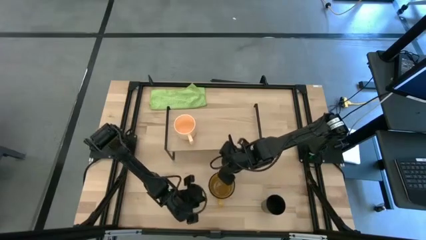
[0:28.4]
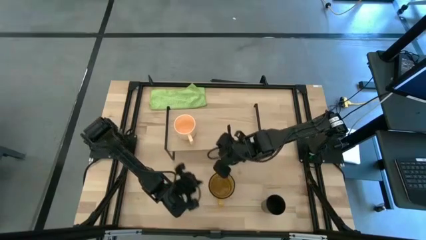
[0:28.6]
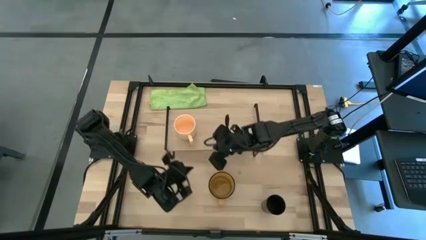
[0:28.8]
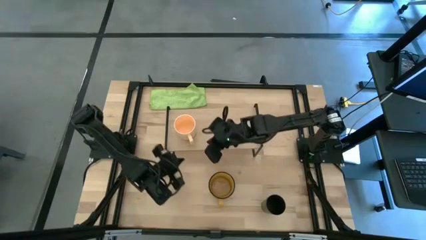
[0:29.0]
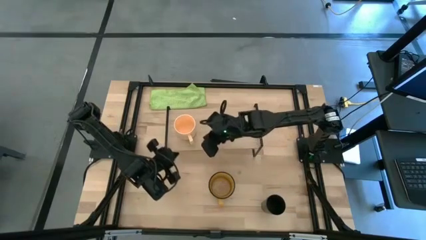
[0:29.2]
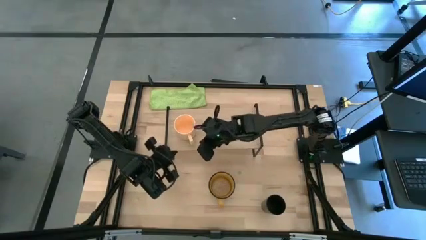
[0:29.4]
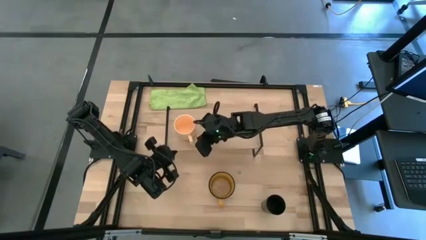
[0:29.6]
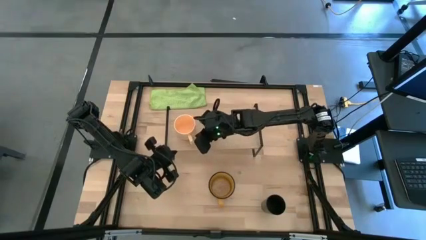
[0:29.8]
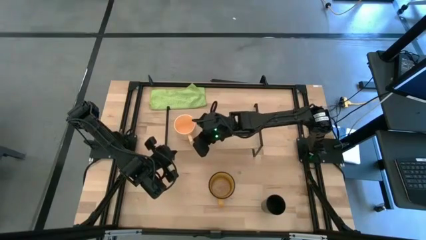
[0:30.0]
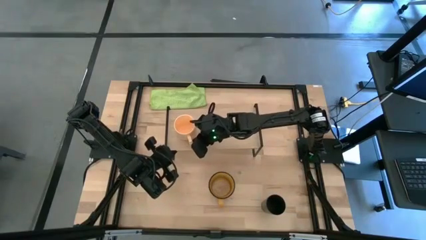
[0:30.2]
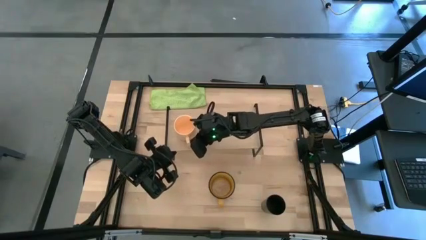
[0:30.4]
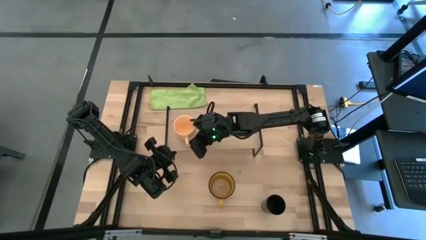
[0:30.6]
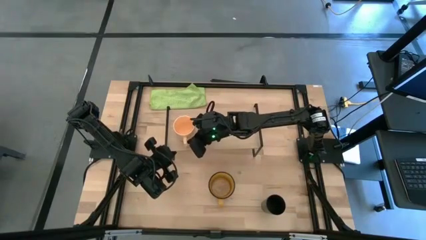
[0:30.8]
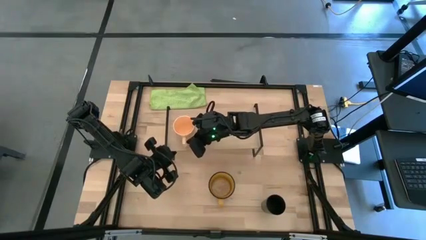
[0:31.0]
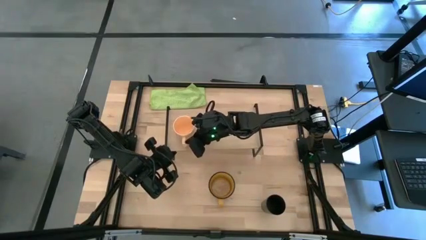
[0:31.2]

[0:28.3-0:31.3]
Task: Stack small to large cups/mugs on shelf
Adjust the light yellow mug on the shelf

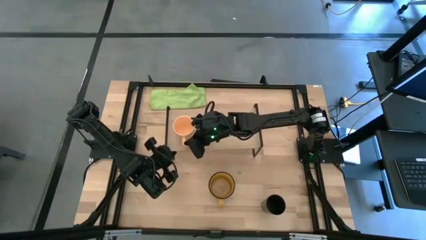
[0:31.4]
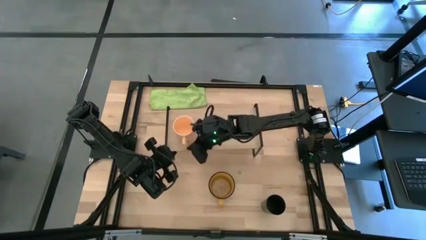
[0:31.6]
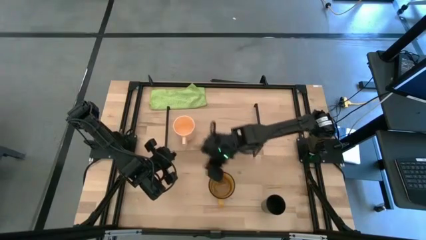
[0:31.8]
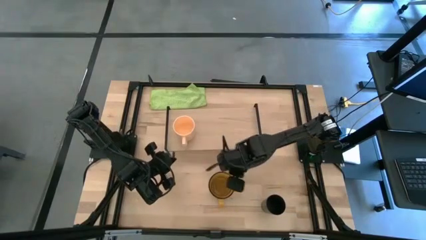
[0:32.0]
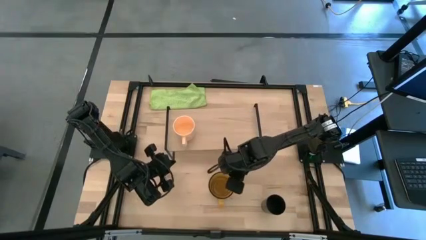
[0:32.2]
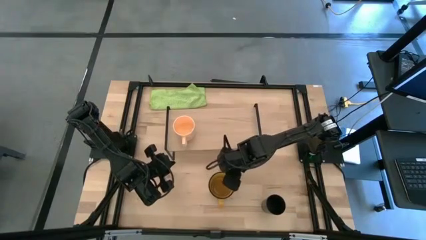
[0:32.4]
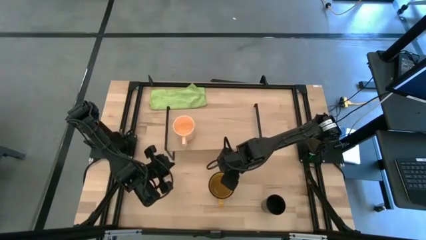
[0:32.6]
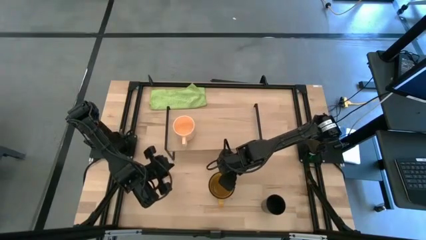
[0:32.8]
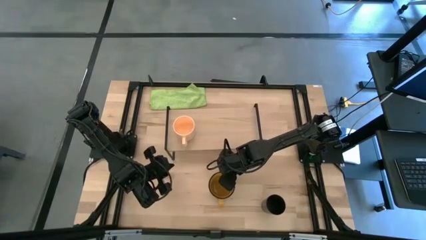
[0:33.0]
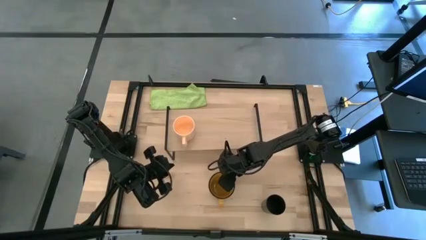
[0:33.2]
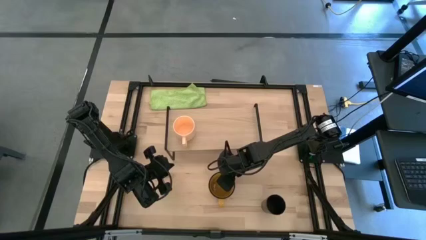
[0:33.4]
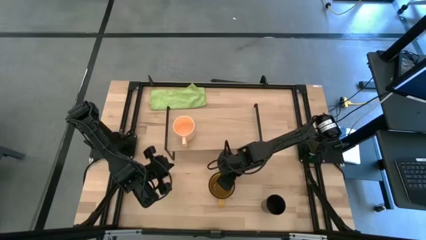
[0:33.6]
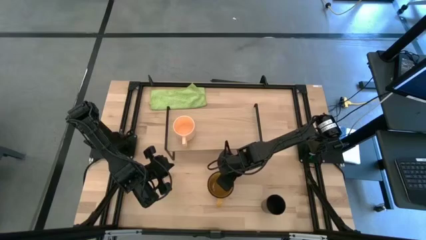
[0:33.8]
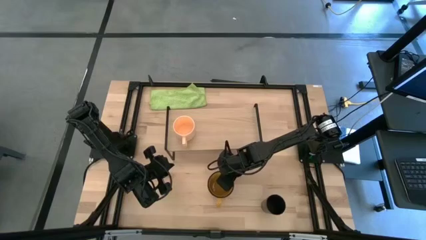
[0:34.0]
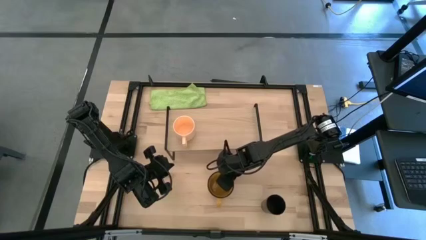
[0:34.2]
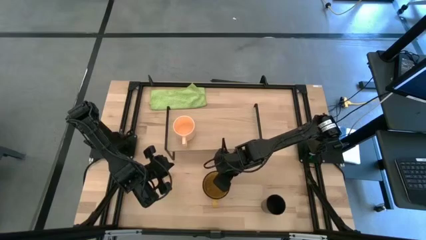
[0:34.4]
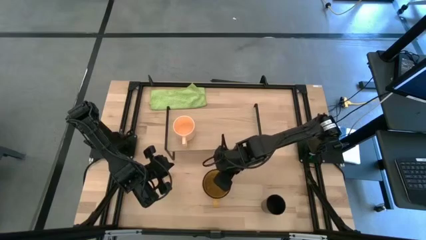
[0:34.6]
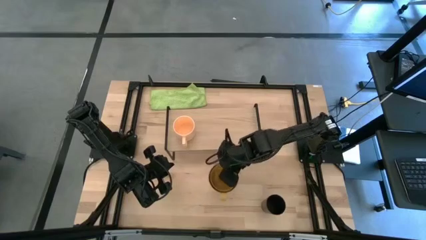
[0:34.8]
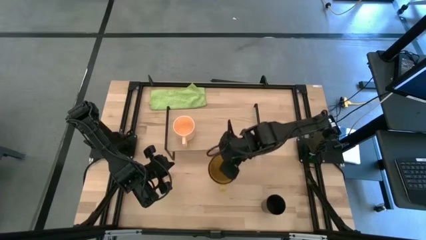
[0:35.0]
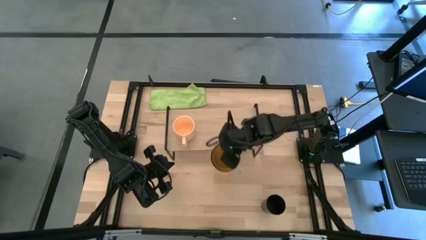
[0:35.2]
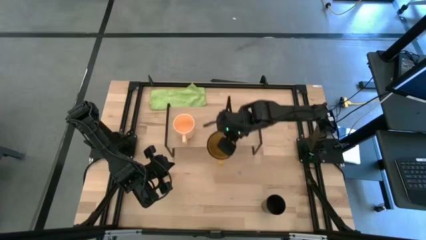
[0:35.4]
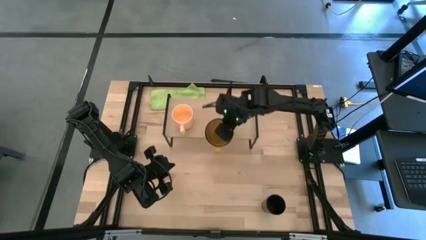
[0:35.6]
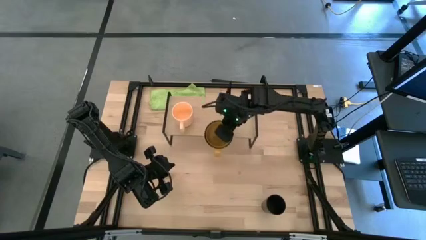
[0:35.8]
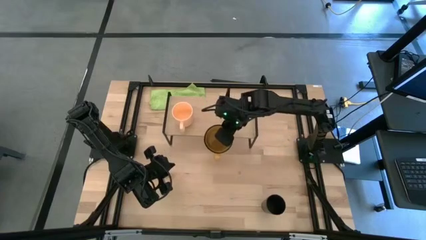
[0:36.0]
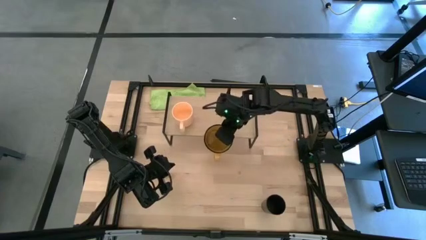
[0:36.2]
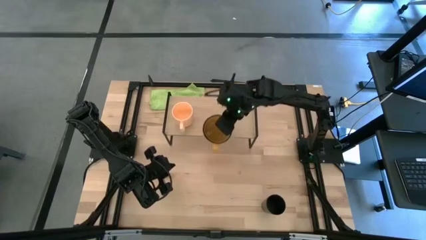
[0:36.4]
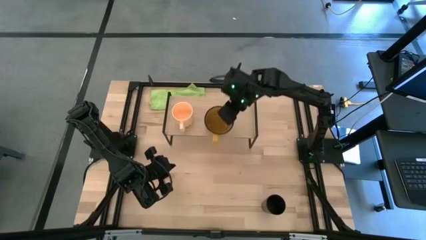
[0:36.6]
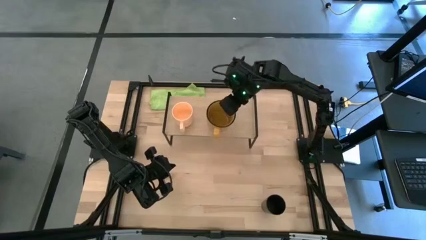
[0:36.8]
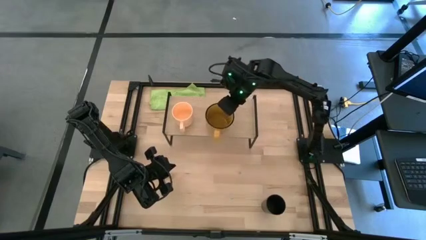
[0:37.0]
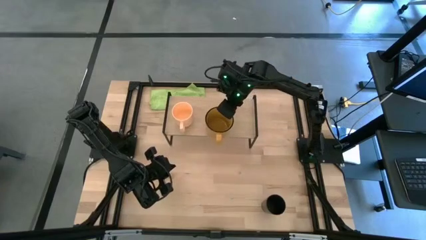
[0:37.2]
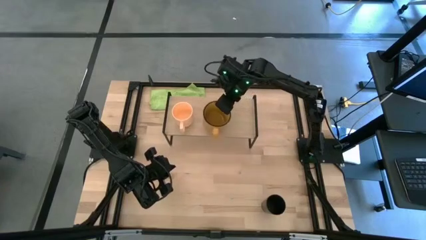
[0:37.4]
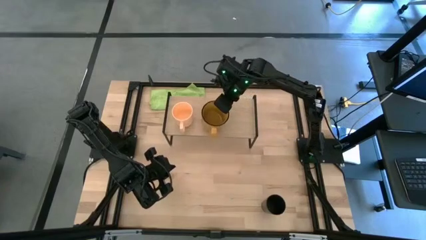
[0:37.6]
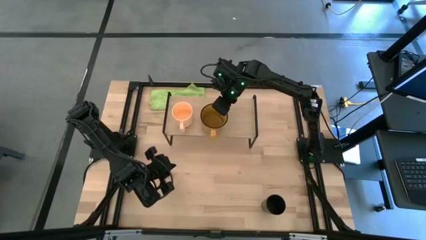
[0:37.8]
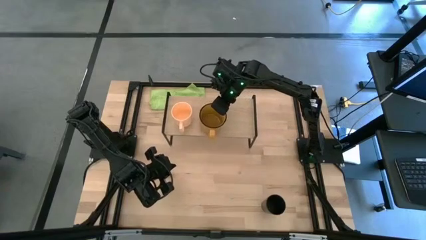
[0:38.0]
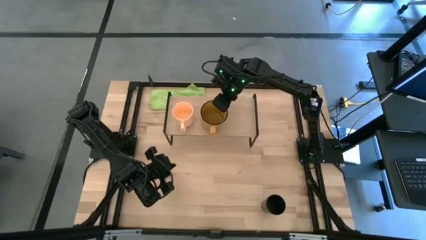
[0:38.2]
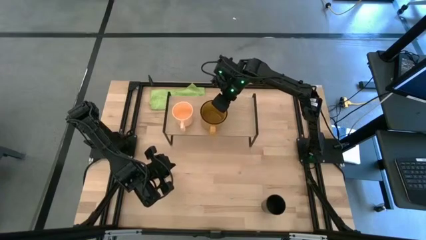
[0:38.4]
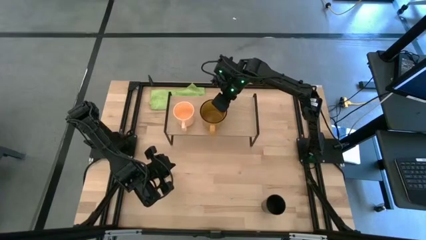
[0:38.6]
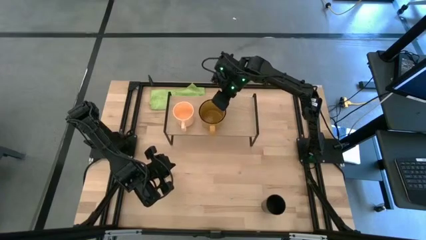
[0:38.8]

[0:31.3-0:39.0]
Put the yellow mug on the shelf
